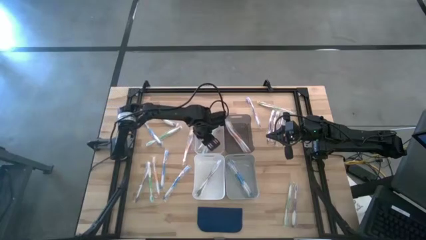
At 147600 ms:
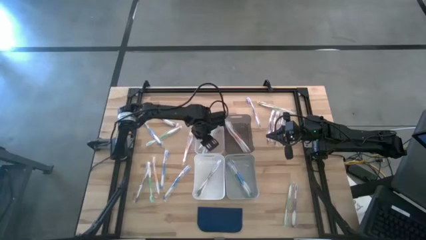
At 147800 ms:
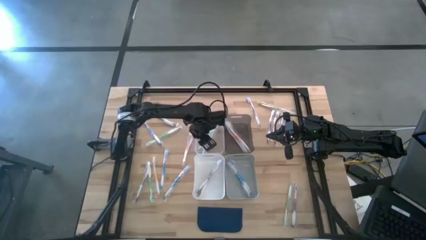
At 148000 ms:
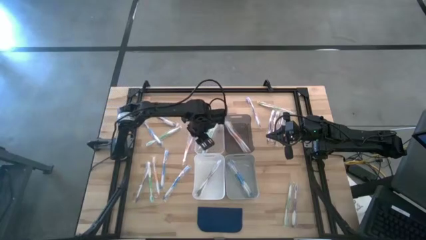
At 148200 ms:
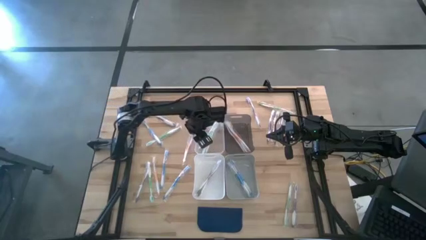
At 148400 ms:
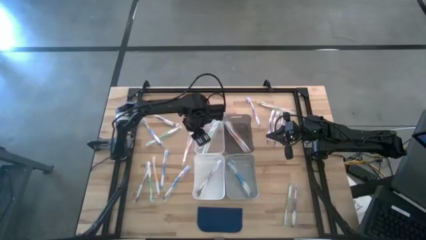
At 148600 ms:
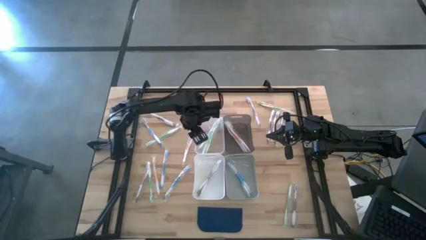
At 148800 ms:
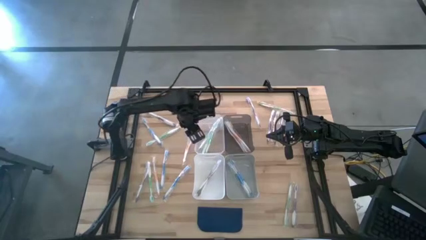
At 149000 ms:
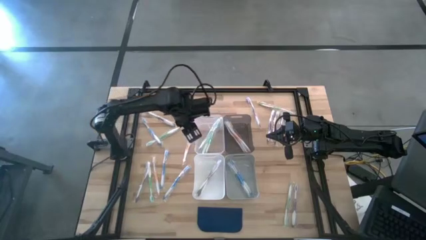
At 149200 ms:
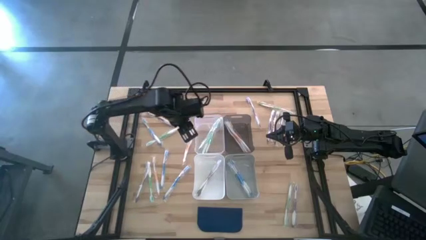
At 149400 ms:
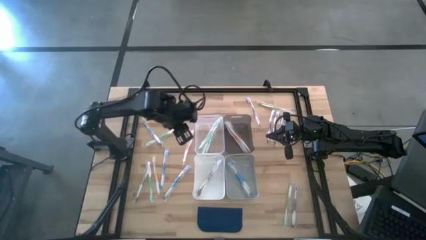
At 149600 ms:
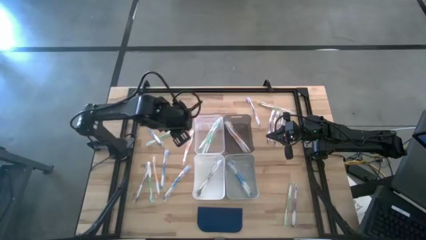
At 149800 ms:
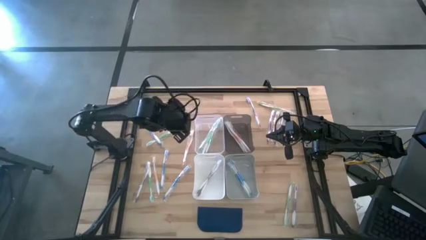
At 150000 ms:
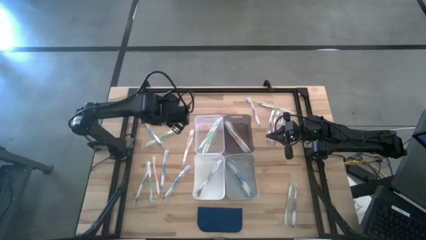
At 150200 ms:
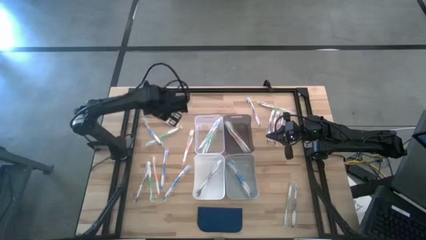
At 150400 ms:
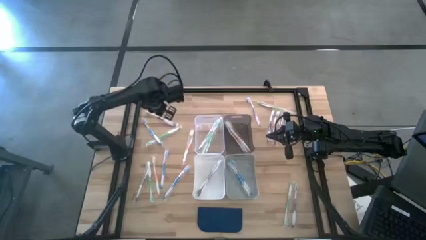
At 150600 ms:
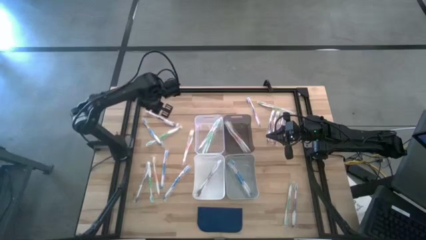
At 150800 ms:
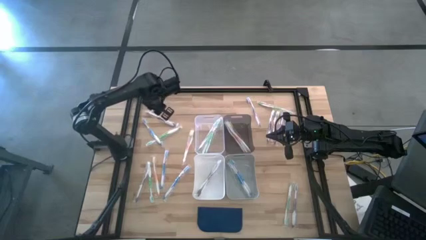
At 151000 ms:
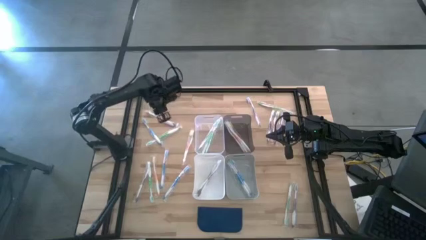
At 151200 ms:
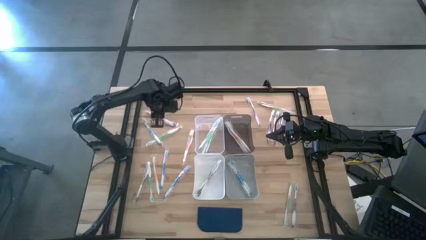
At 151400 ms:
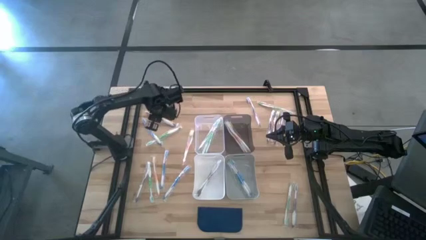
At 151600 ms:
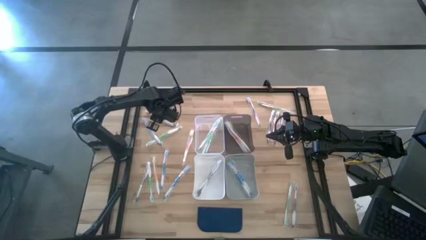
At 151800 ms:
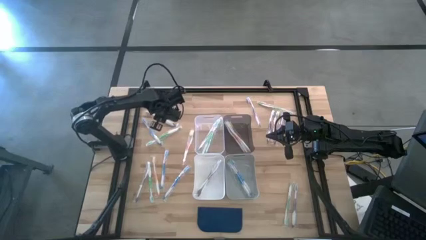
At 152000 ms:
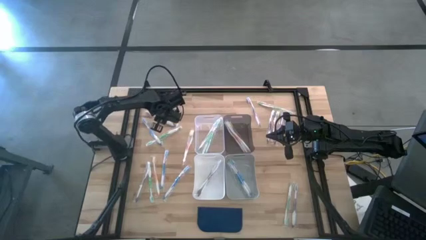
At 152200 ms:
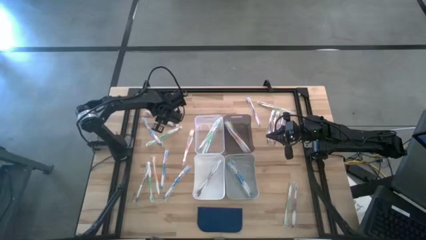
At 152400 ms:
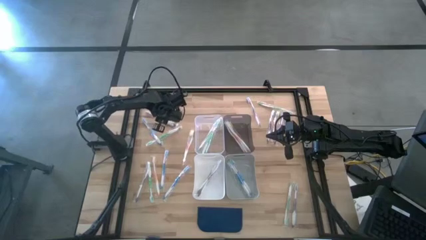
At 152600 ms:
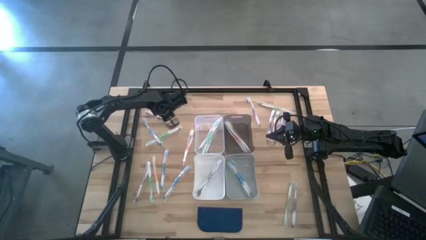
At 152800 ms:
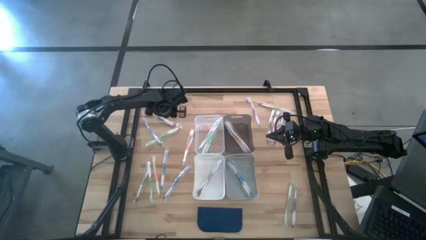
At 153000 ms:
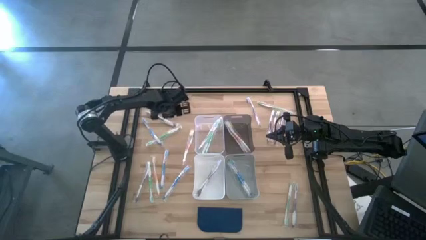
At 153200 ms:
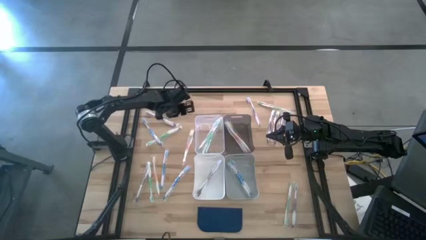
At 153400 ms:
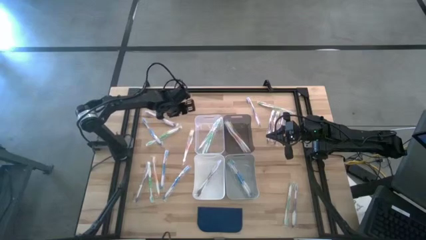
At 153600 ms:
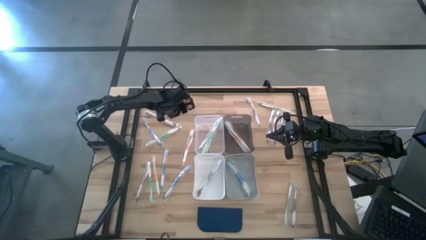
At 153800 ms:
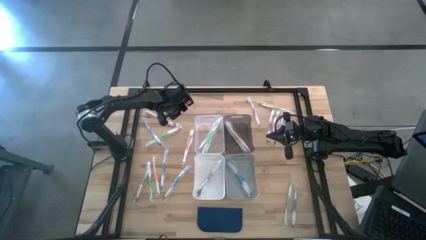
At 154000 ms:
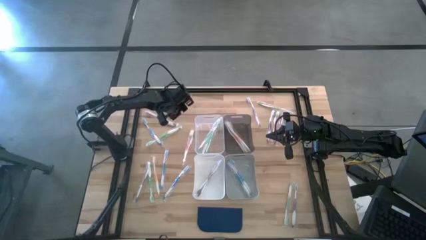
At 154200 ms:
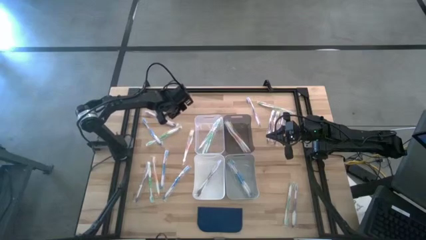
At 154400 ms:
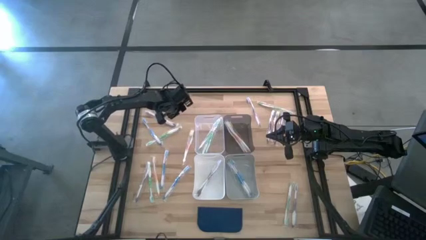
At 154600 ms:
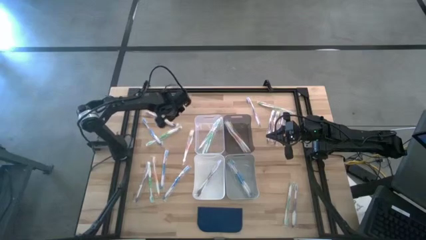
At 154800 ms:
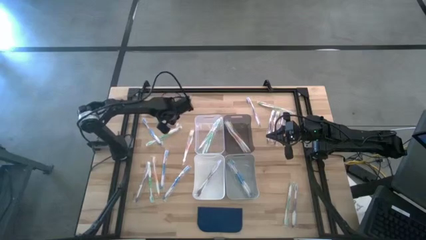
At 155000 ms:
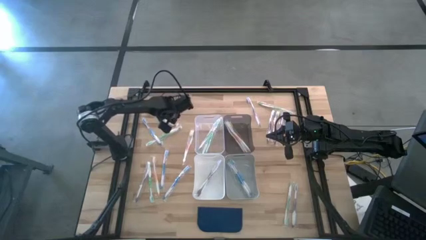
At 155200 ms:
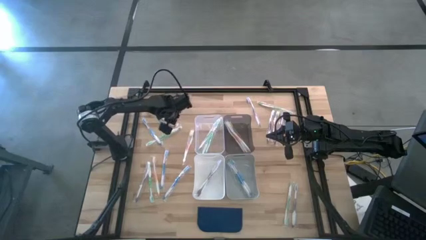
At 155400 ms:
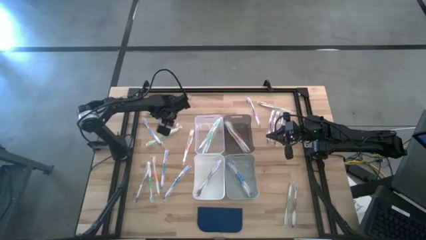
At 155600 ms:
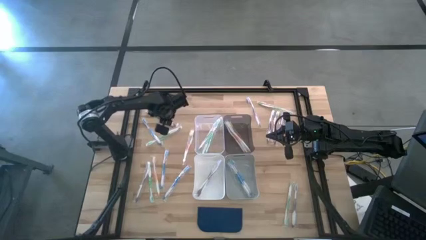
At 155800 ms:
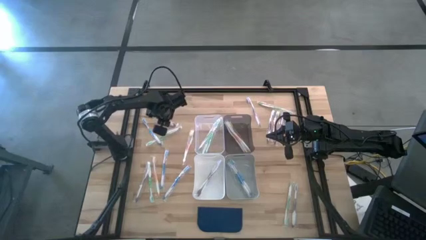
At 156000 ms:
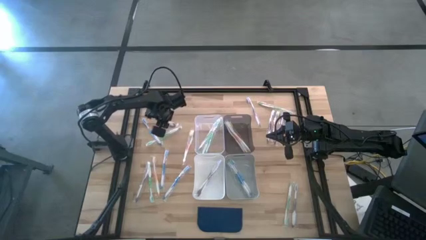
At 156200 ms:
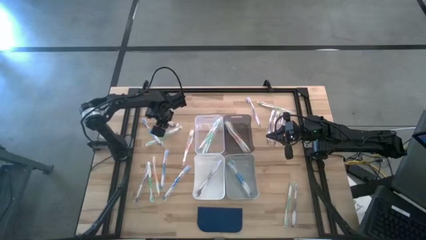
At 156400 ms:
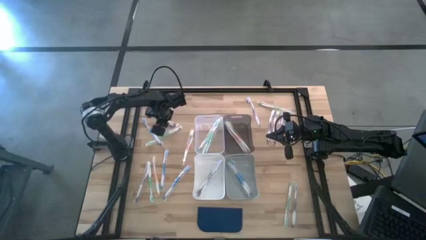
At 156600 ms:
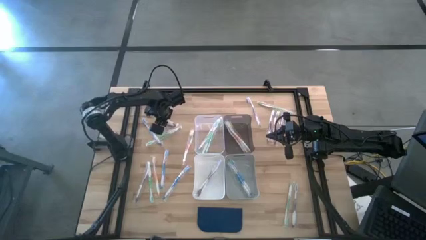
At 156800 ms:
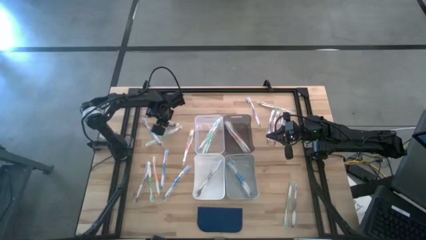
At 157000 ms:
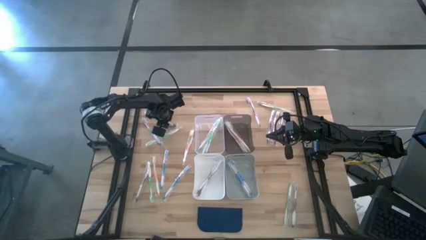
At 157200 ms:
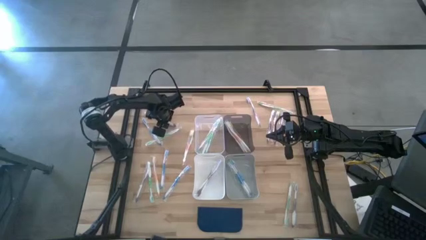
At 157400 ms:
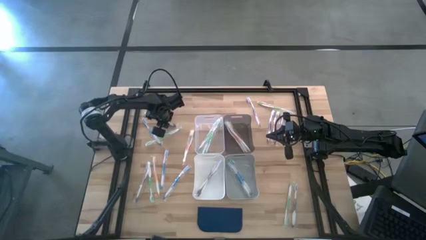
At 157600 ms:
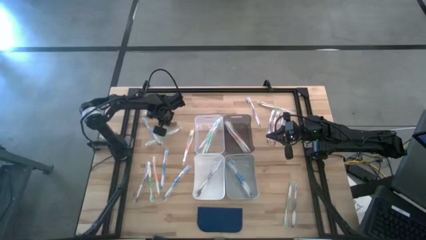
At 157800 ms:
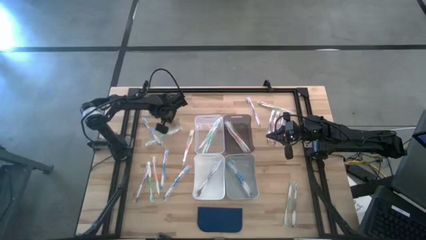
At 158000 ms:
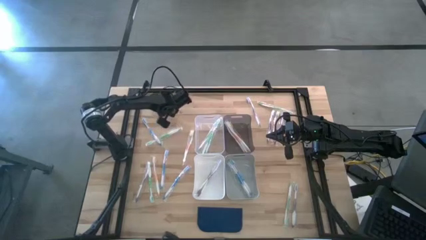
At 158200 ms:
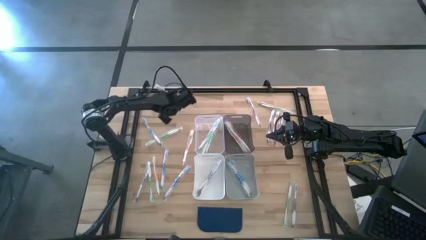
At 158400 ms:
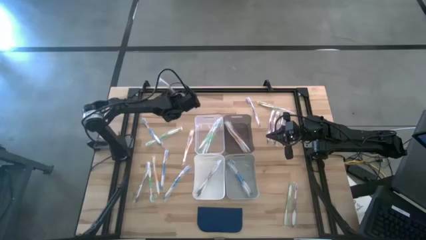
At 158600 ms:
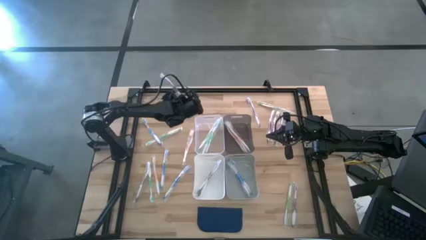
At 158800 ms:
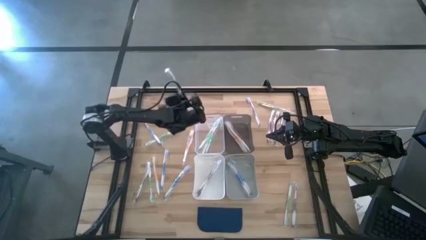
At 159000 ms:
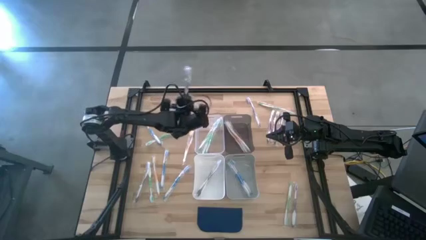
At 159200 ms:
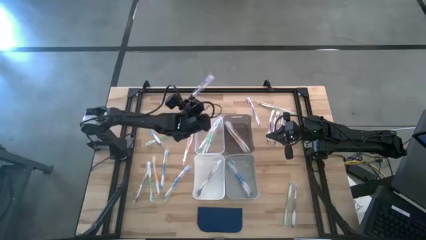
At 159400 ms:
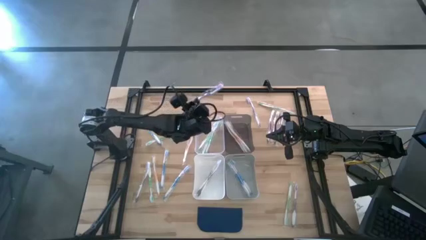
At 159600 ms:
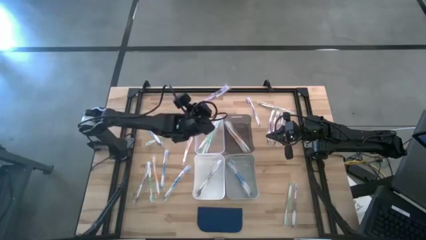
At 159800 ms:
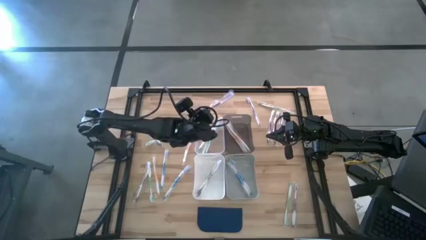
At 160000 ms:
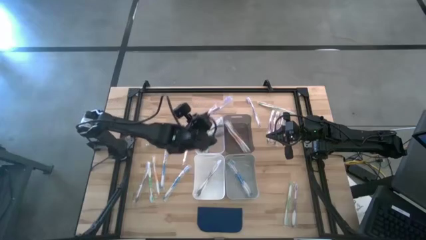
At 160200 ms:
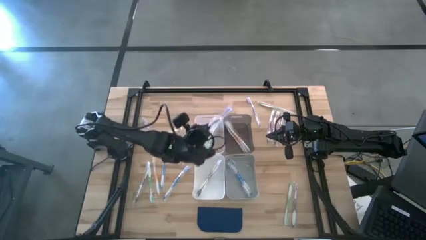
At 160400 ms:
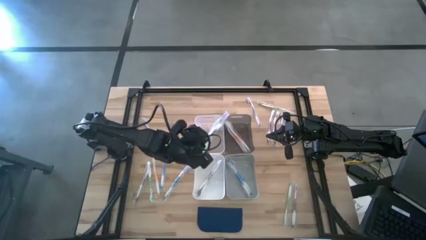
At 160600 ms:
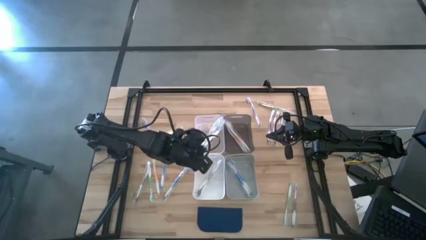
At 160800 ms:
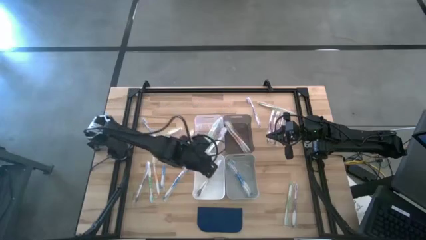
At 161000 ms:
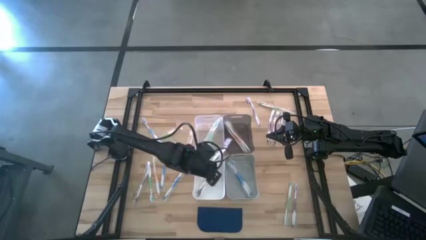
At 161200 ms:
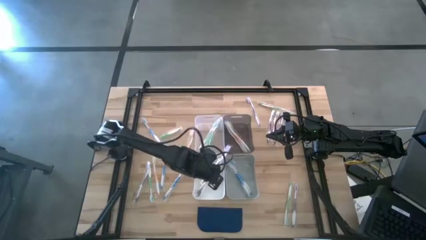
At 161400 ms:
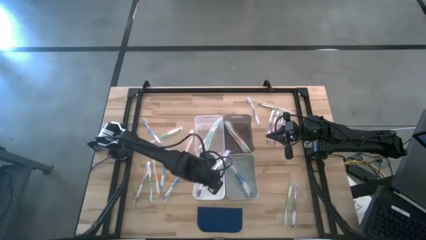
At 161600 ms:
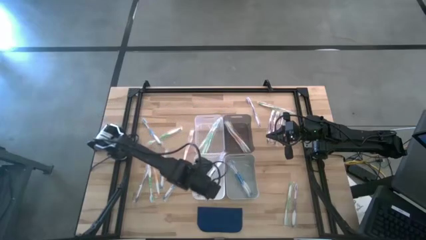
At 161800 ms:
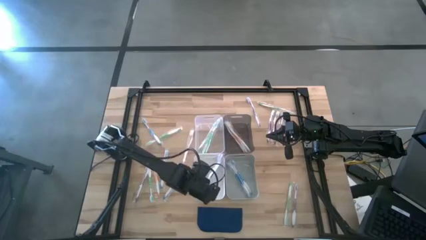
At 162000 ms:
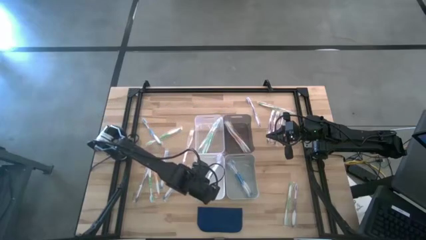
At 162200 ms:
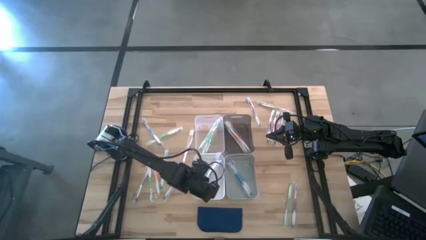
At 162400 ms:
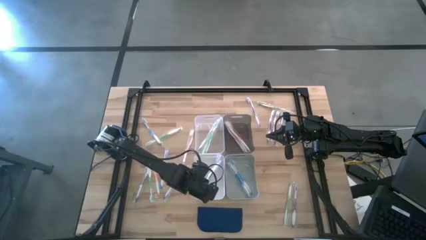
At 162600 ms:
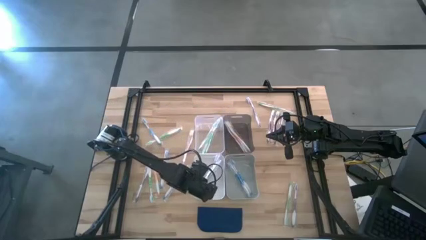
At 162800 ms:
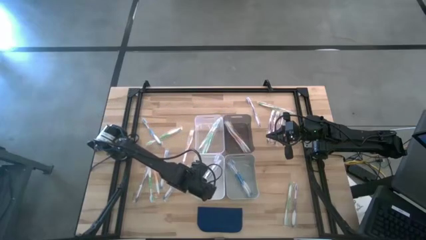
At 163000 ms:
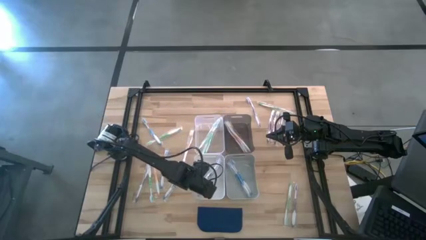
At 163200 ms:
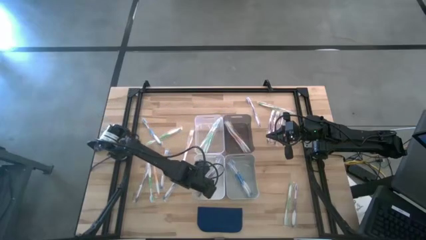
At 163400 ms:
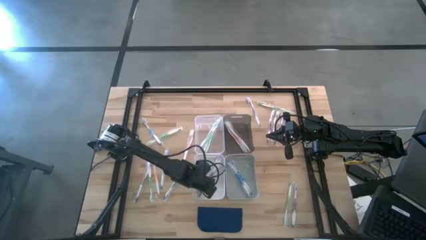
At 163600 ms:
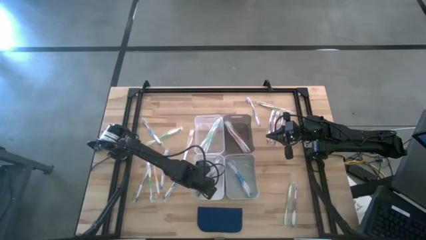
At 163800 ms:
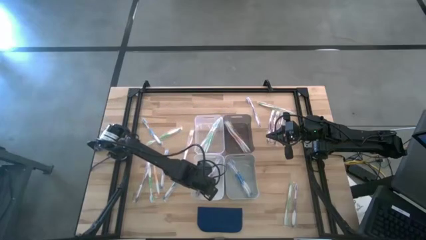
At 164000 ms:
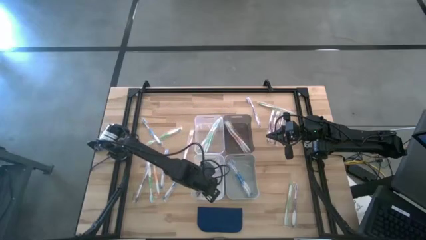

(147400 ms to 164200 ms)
Task: Pick & Place Toothbrushes
Put the violet toothbrush into the white bin
